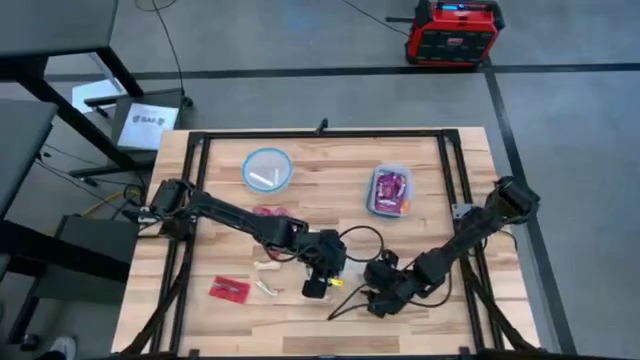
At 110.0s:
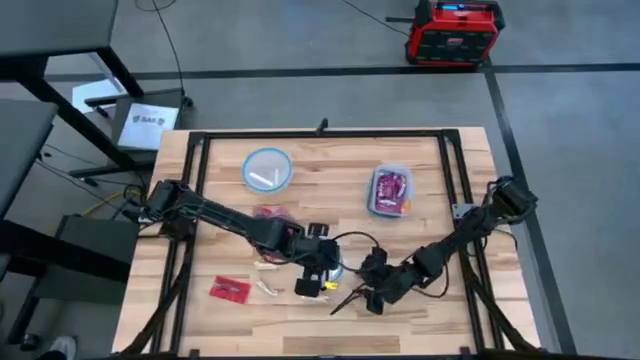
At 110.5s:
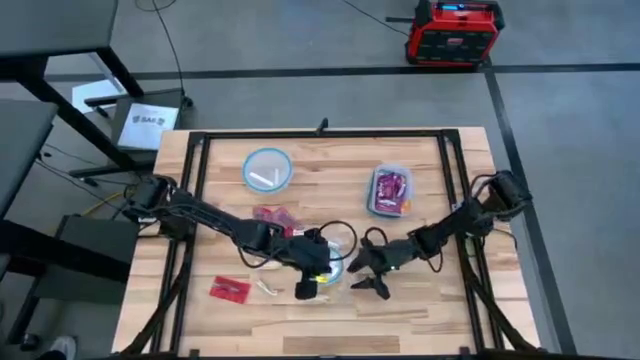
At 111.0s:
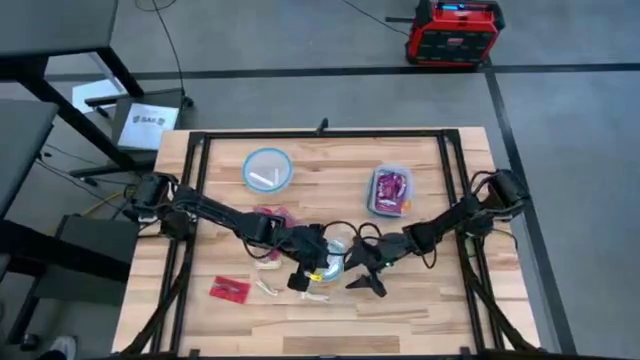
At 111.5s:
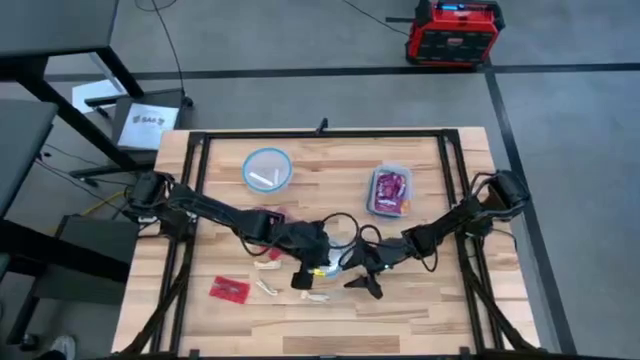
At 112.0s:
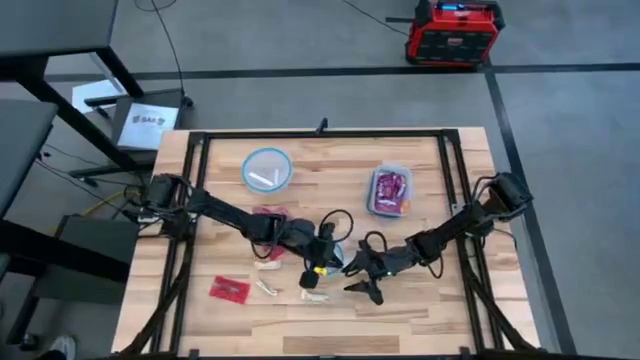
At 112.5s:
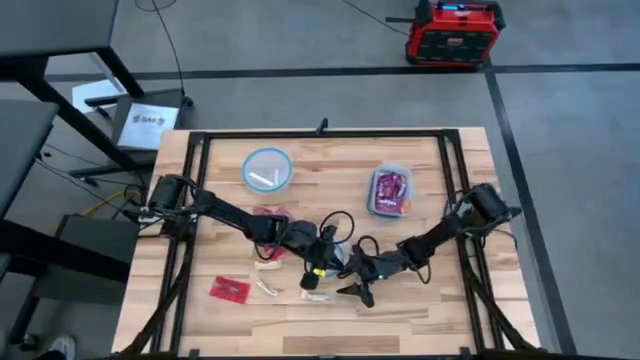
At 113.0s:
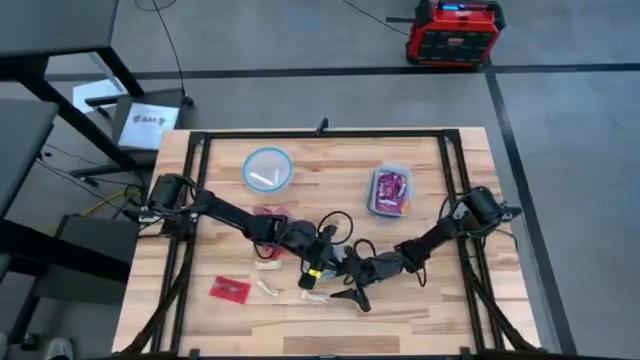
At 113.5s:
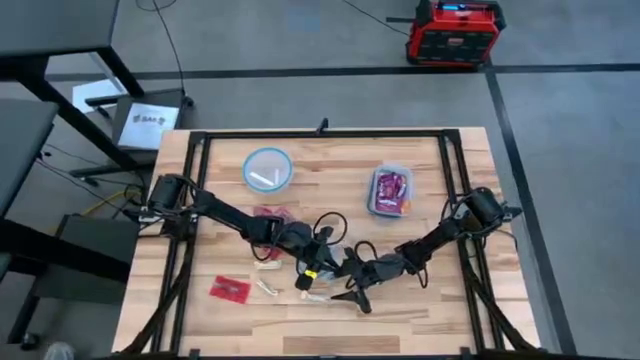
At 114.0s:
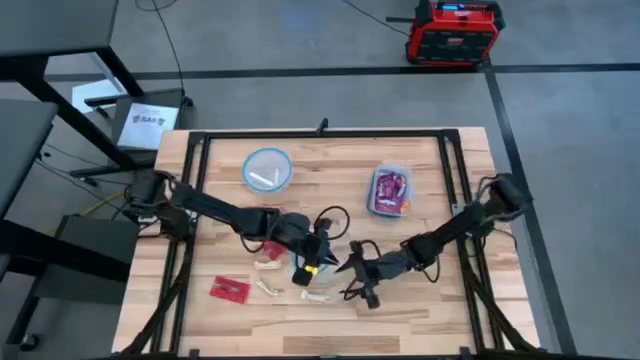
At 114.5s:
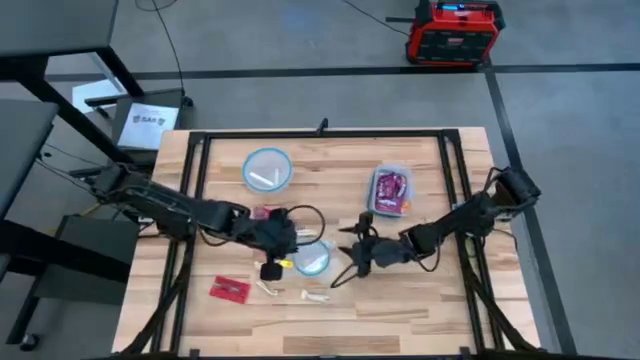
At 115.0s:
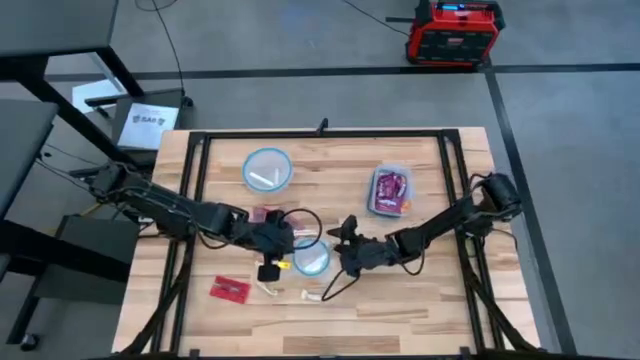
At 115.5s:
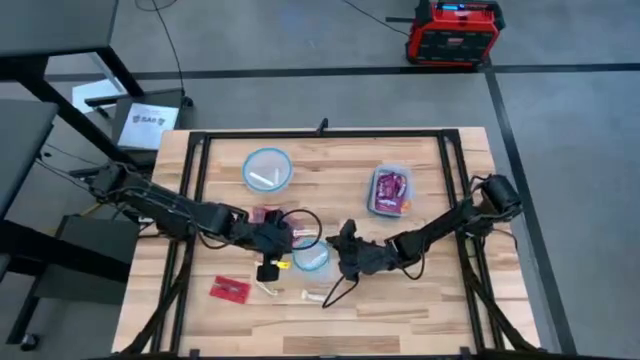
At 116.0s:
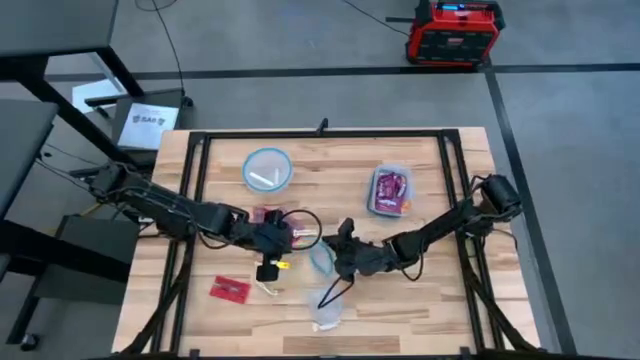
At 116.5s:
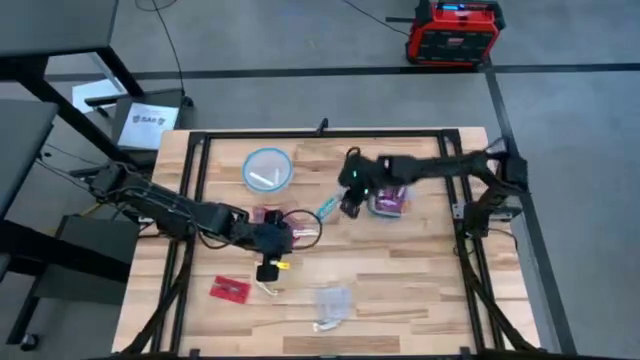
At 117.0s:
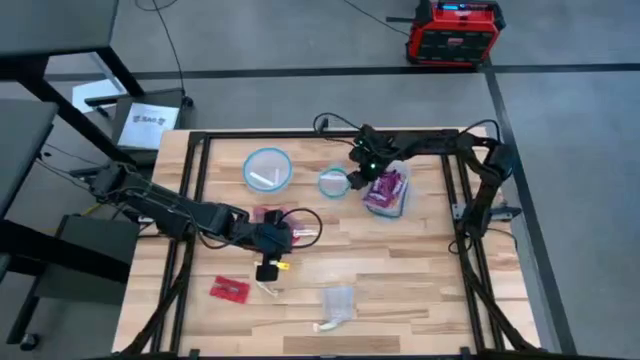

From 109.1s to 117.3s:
Task: Sort candy
Open the center transparent bin

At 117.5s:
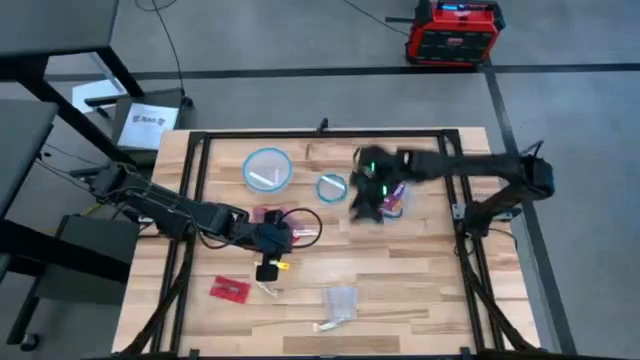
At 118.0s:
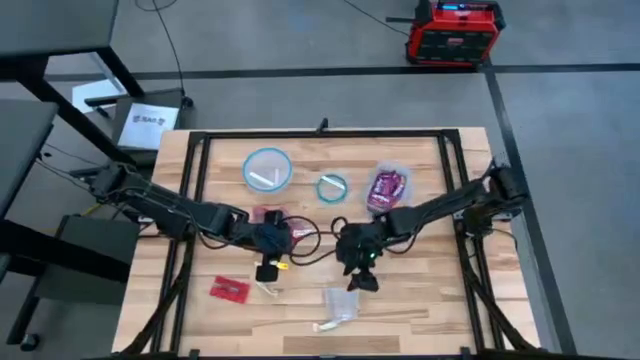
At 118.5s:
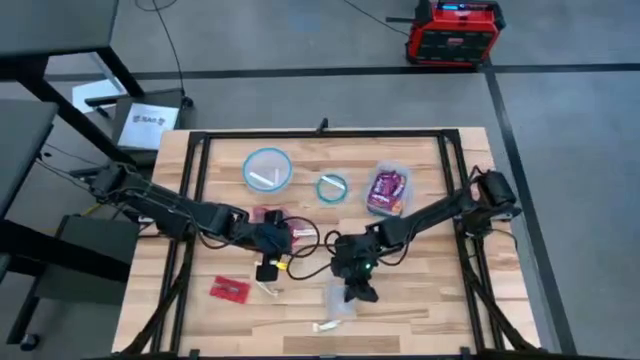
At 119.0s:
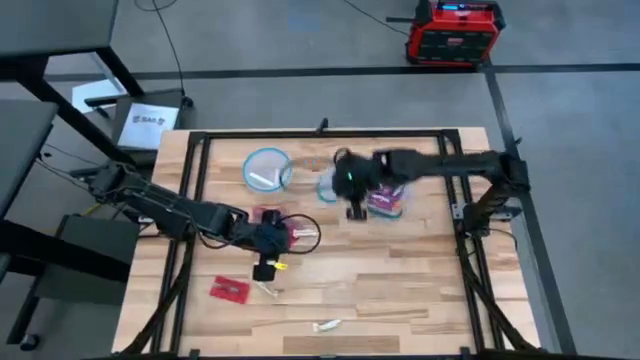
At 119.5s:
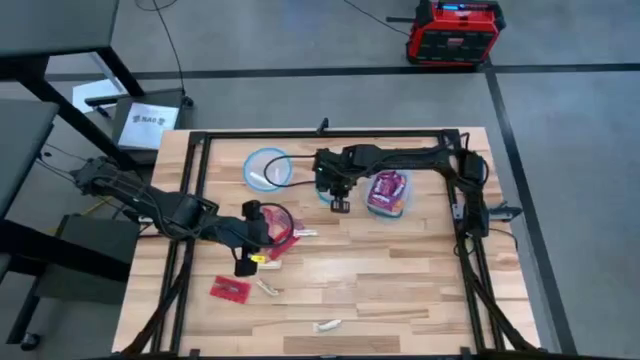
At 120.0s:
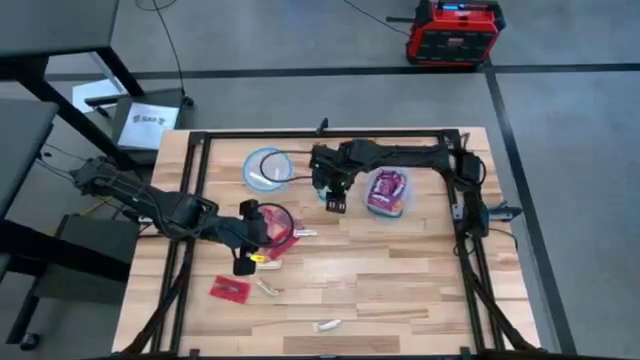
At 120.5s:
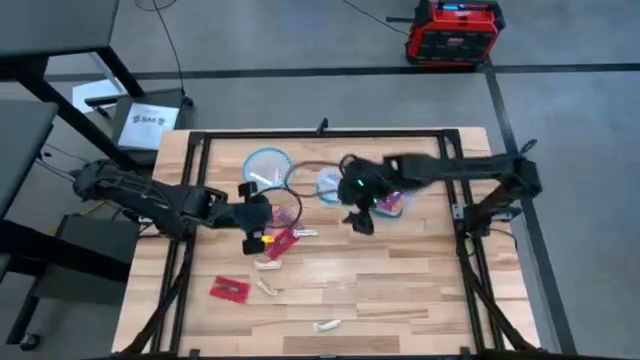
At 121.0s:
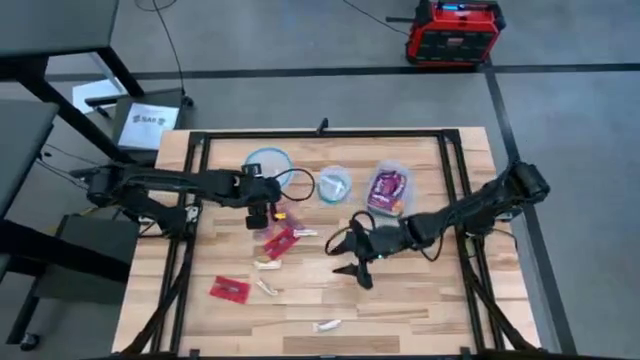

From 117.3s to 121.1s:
Move the center transparent bin to the top center

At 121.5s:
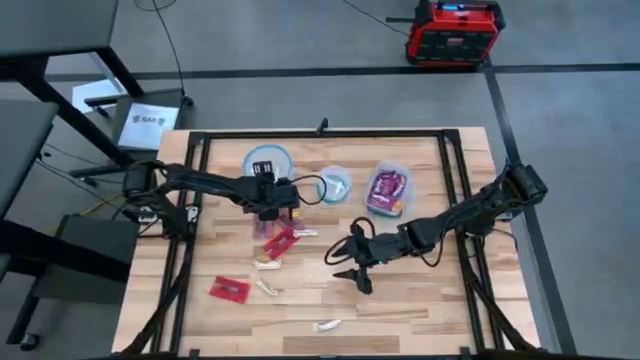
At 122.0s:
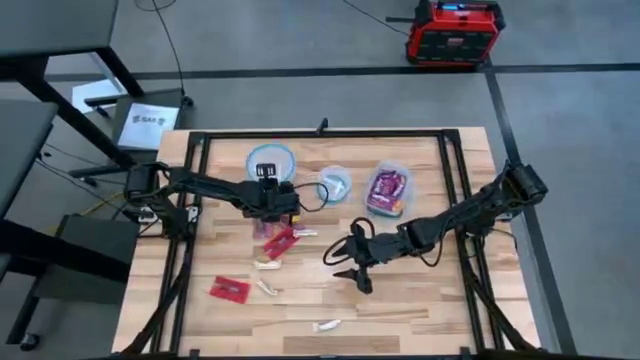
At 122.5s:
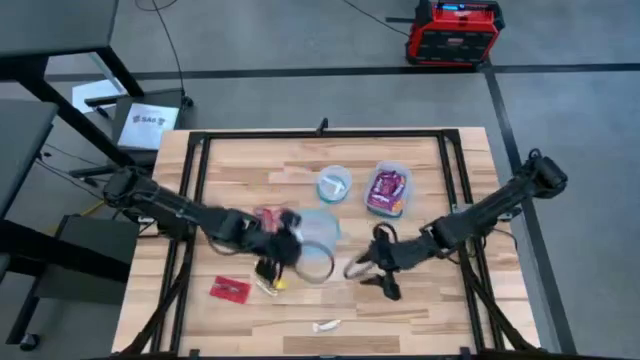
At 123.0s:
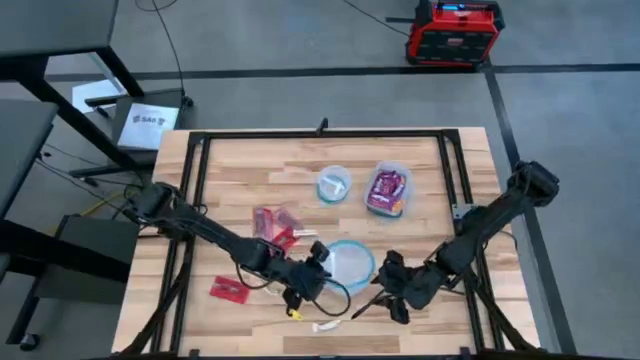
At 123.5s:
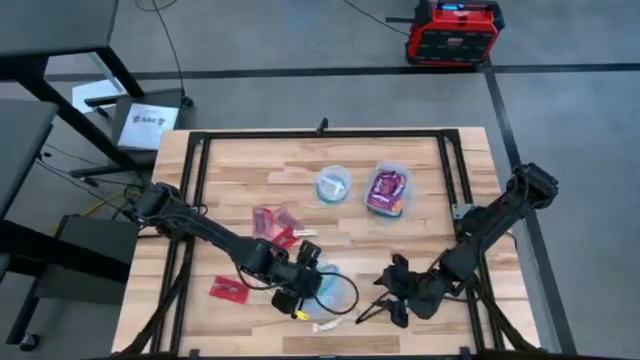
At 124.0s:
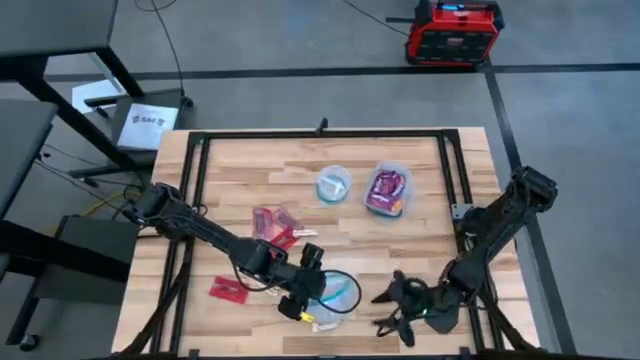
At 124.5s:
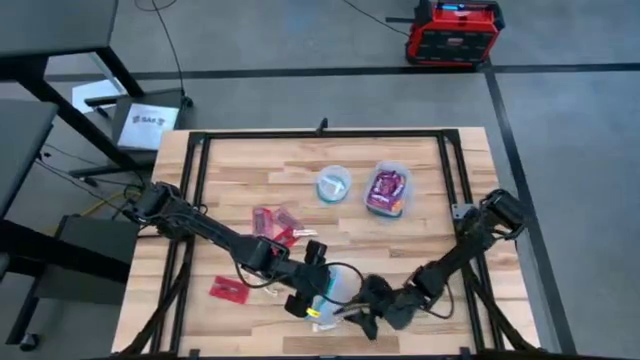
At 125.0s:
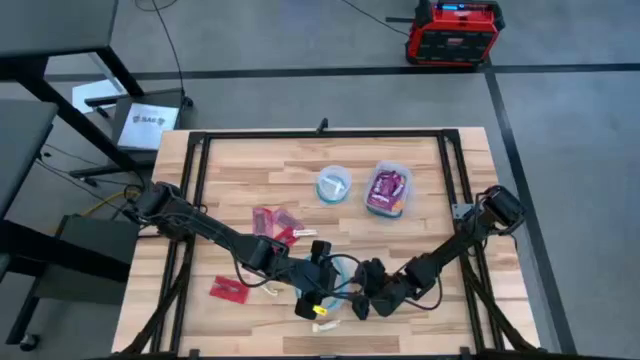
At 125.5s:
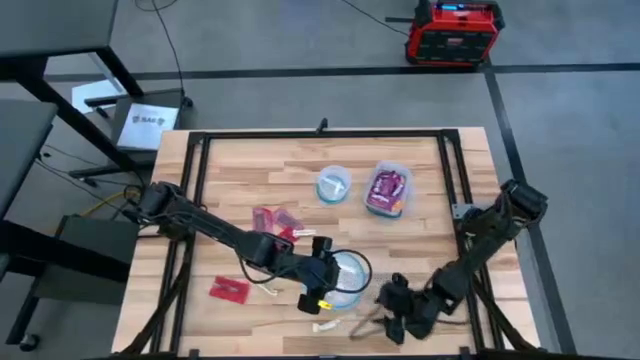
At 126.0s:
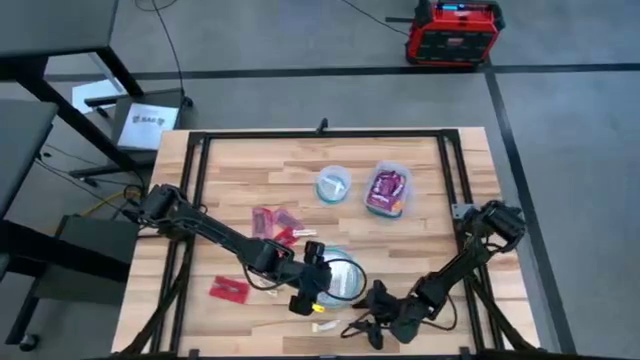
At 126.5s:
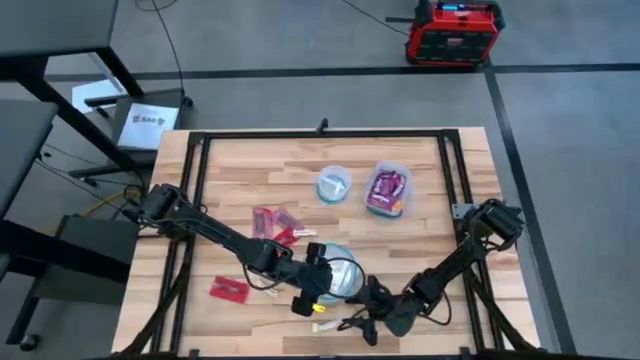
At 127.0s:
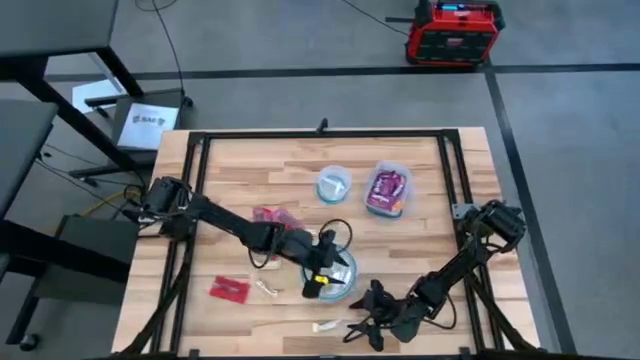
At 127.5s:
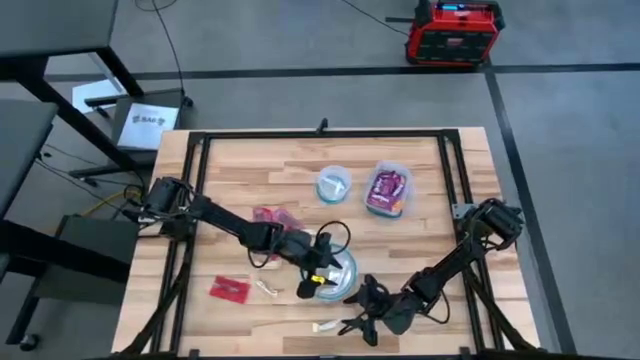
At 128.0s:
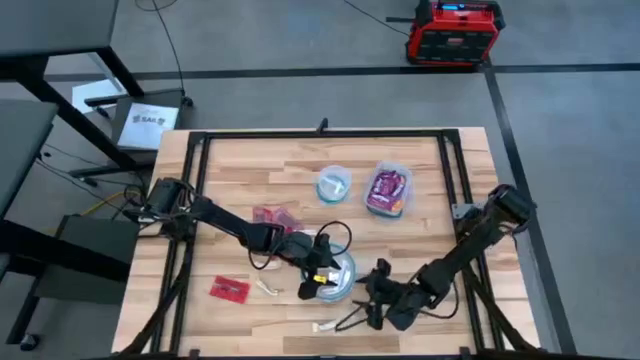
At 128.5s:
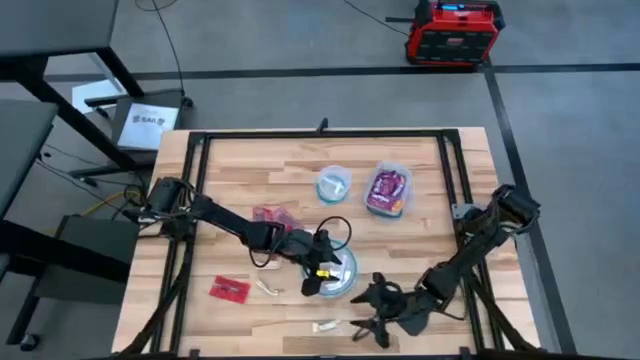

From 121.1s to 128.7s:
Move the top left transparent bin closer to the center
